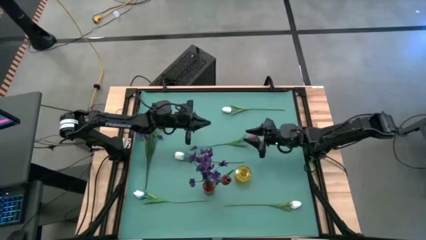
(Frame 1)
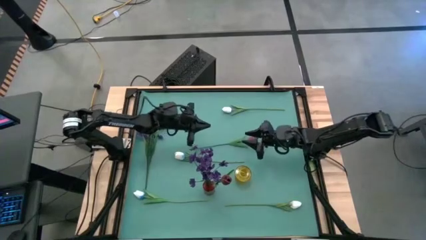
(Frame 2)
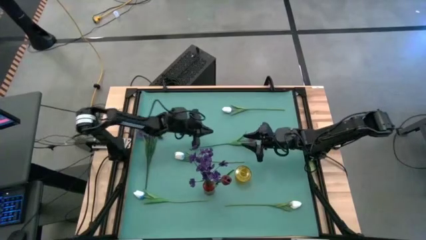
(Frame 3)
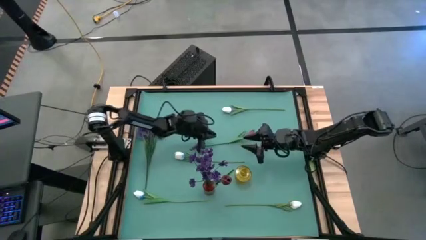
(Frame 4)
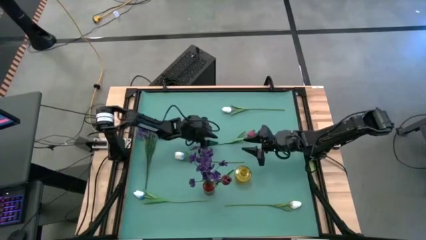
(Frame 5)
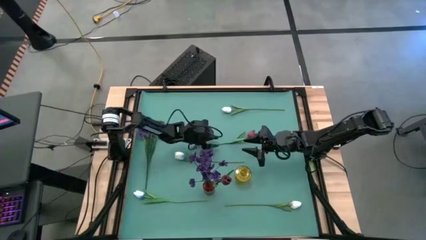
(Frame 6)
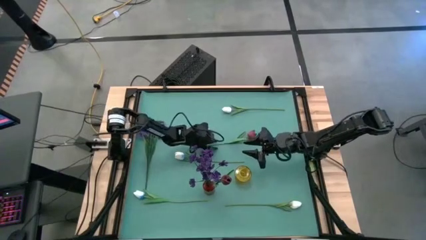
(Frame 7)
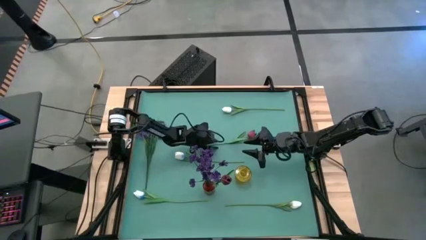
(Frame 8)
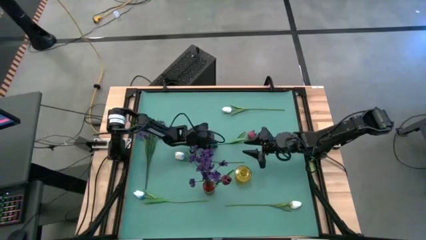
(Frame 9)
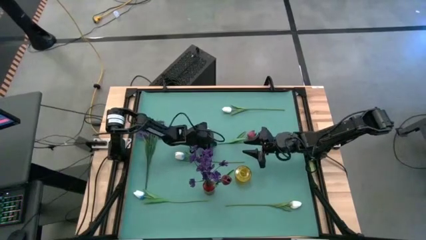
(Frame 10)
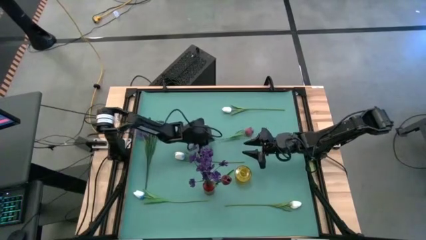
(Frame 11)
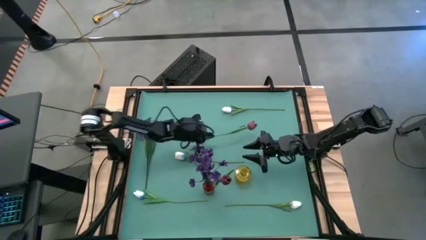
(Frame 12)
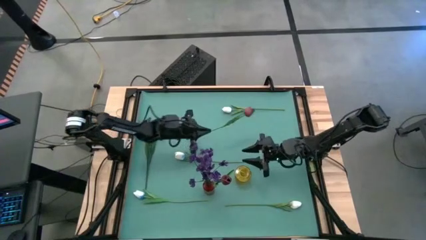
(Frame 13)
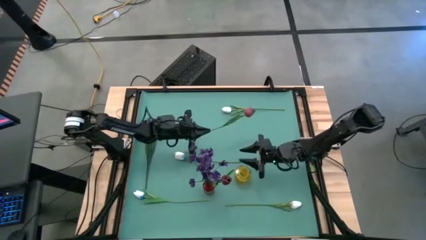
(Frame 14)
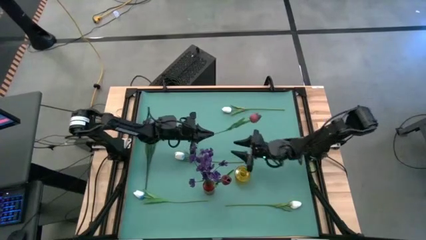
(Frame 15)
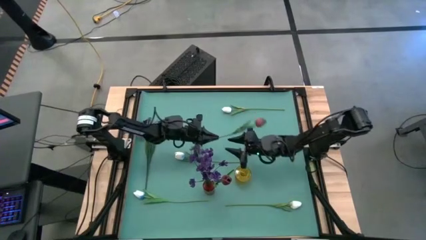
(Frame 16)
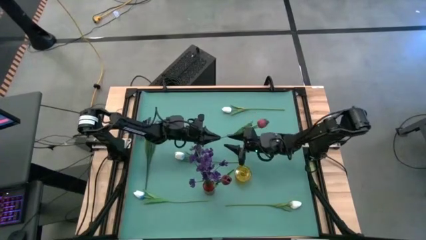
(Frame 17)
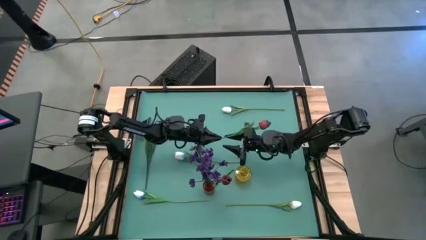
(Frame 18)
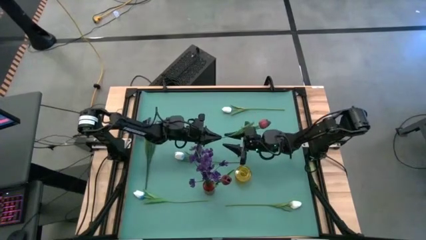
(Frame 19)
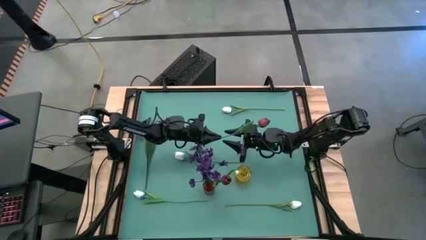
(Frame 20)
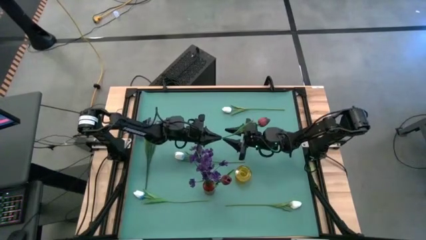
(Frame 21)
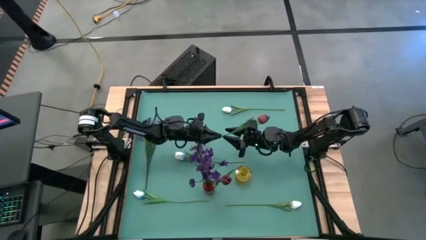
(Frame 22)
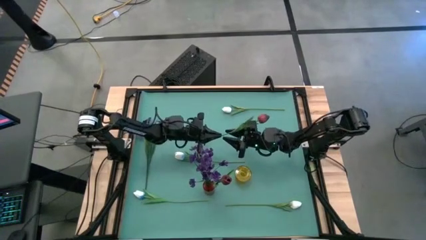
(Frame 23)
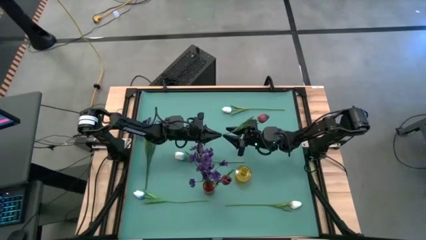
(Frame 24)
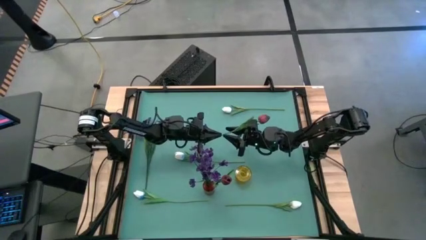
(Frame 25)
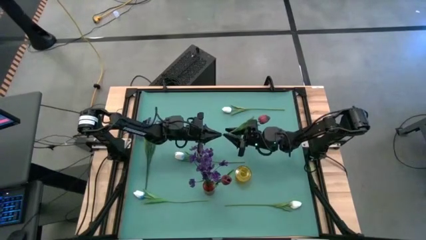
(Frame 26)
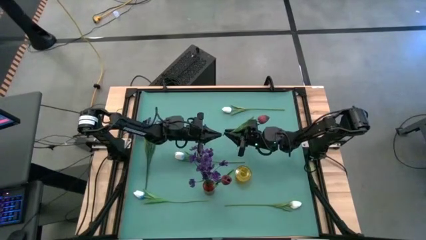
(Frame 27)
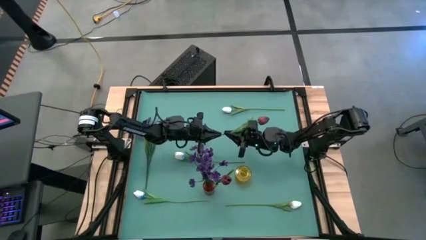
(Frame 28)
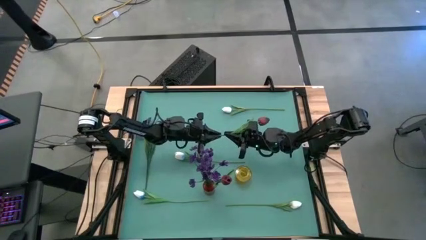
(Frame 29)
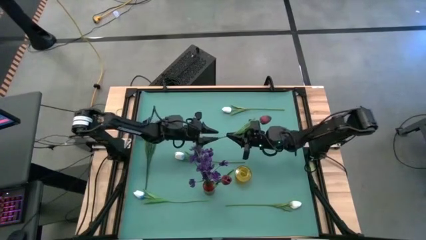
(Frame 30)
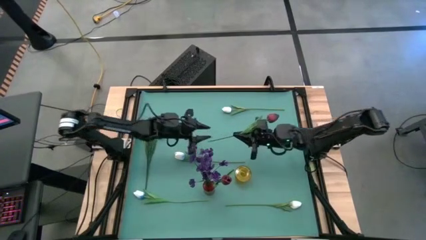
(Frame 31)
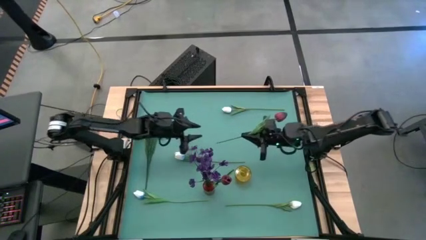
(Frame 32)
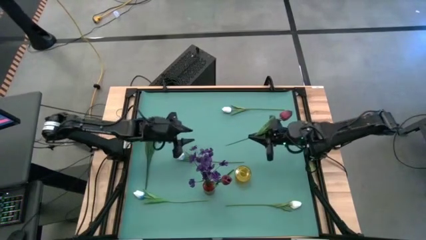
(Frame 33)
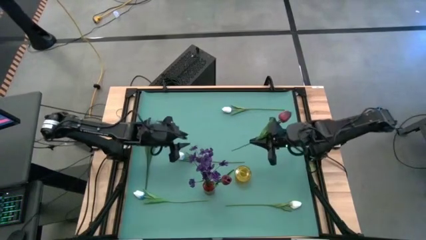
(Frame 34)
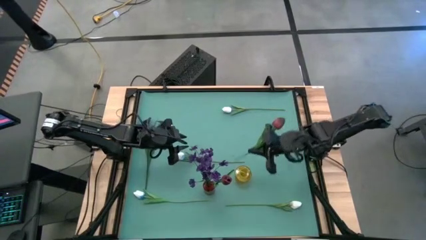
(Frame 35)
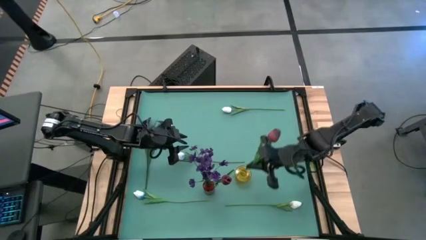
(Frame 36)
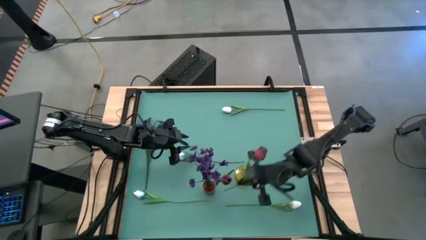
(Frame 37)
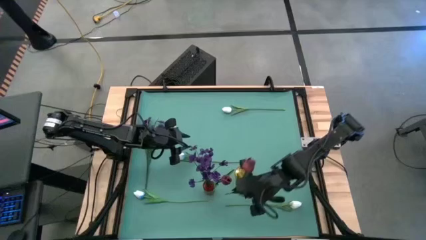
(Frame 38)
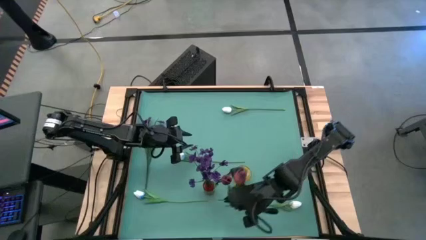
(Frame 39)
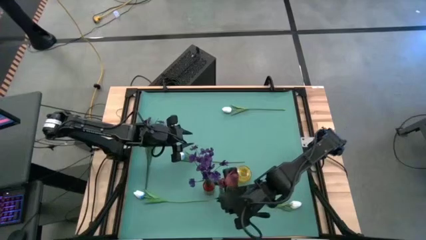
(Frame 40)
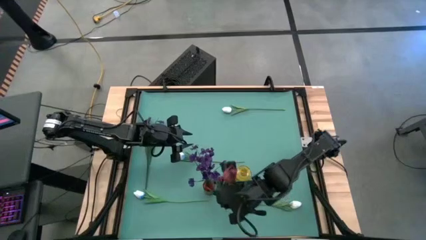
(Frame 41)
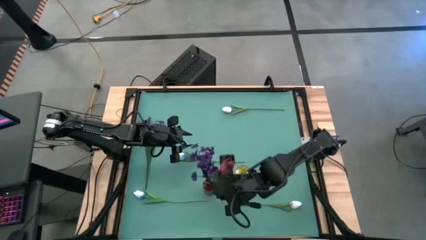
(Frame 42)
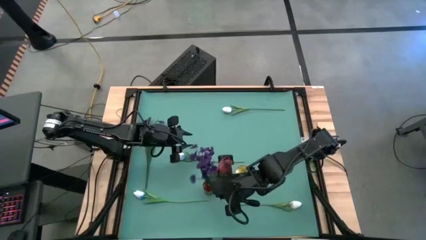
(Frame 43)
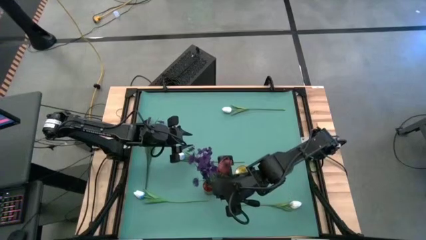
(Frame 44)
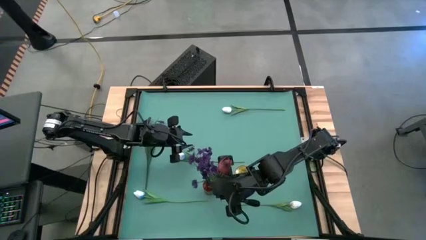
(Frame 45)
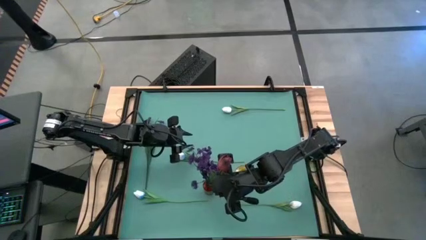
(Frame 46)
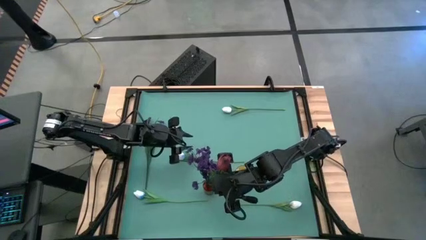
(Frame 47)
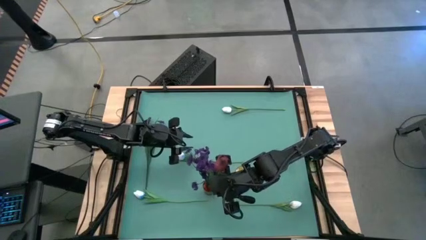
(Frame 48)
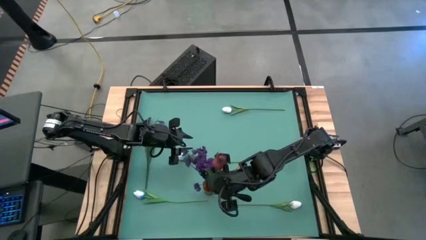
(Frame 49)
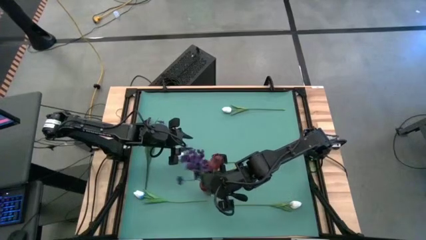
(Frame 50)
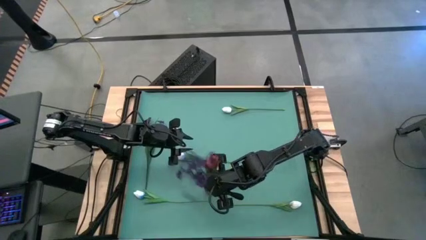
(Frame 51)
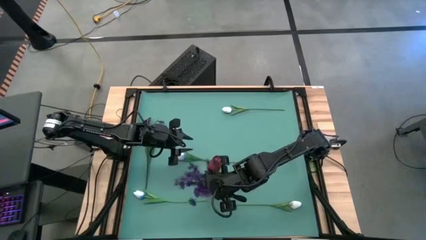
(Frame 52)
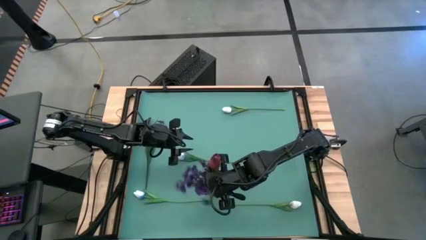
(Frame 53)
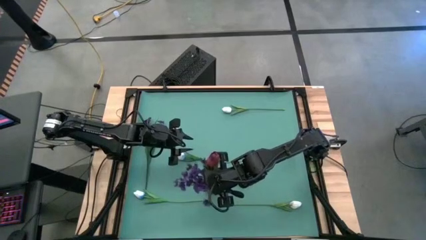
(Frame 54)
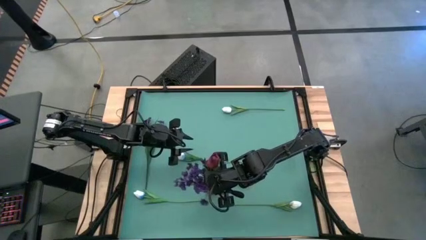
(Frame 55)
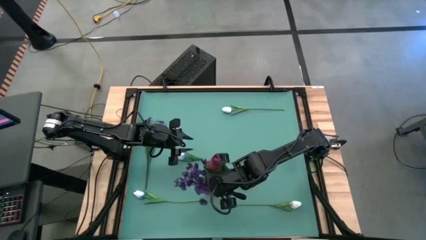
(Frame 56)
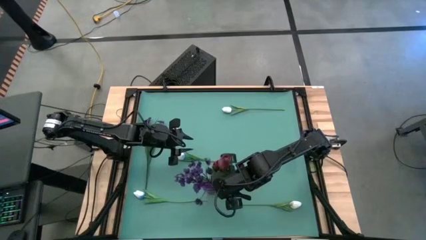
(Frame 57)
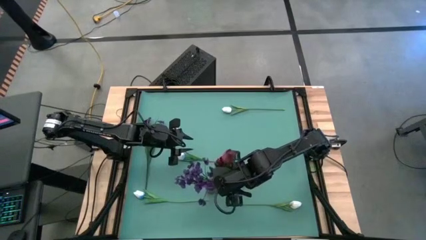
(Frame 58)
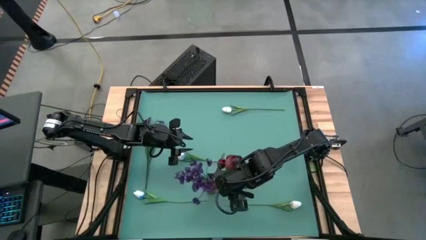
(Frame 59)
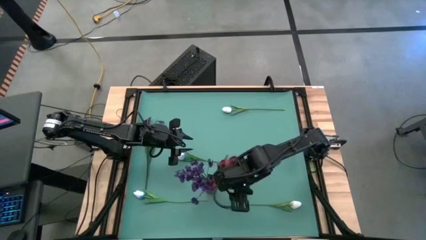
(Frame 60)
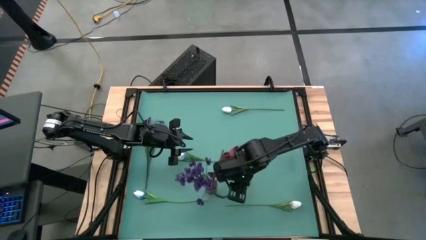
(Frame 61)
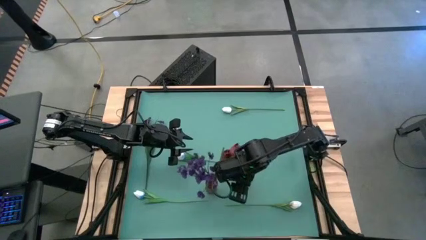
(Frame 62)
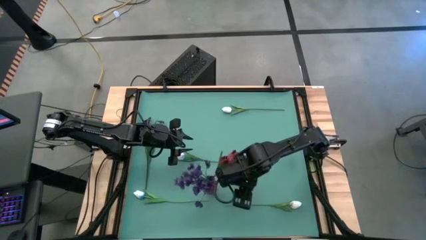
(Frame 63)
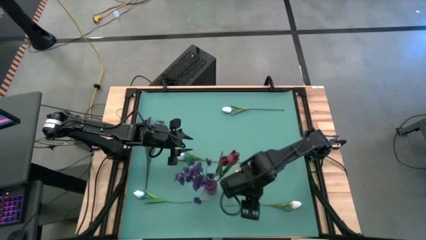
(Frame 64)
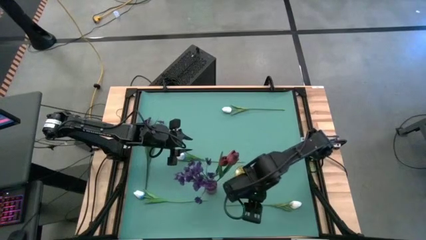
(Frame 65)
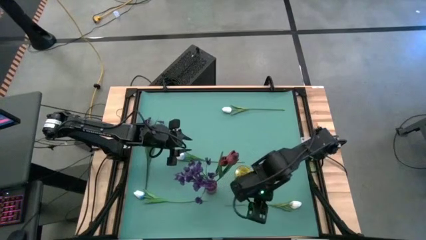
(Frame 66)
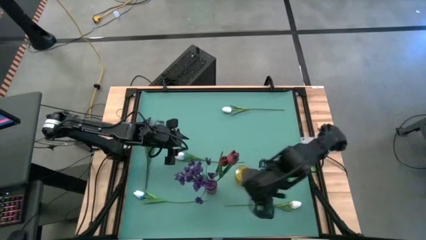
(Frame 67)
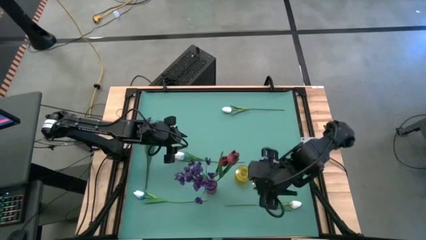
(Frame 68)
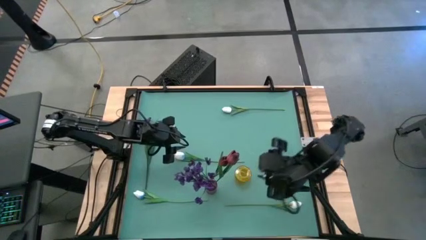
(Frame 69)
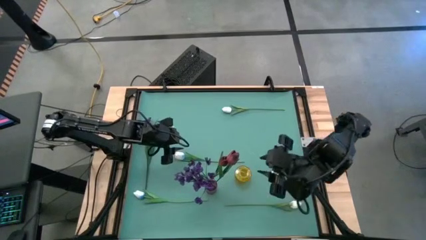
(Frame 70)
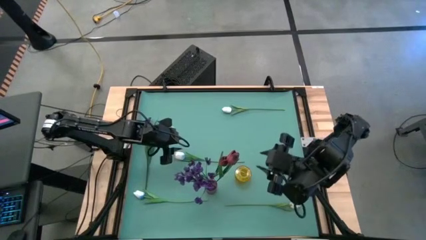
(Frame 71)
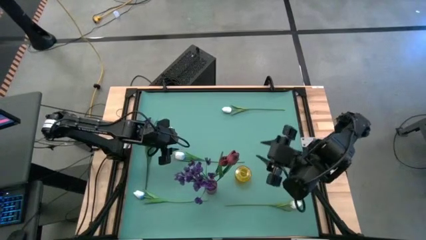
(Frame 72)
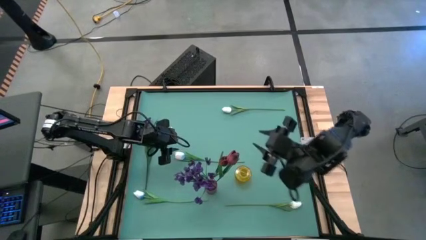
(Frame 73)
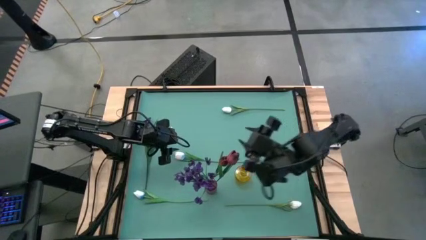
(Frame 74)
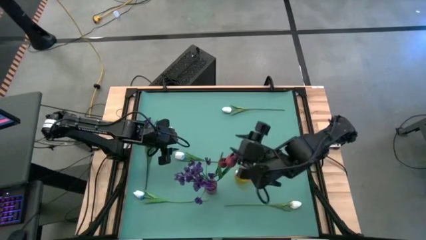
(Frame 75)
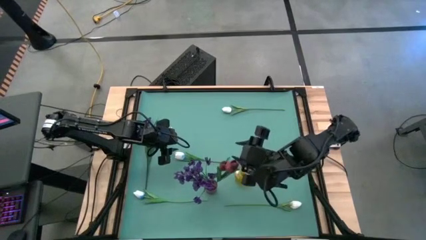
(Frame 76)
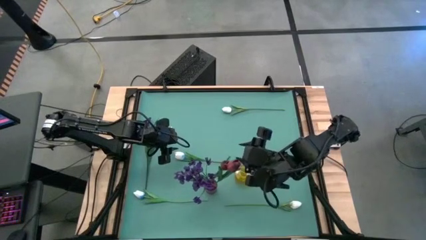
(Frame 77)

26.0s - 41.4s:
Task: Sort flowers into vase by color
Put the red flower into the red flower vase
